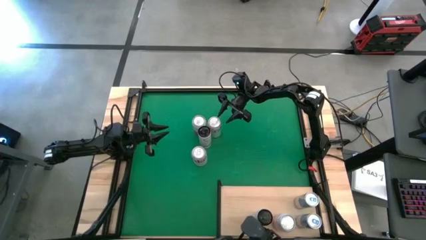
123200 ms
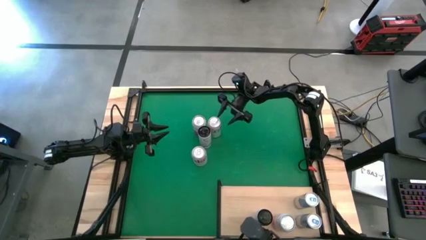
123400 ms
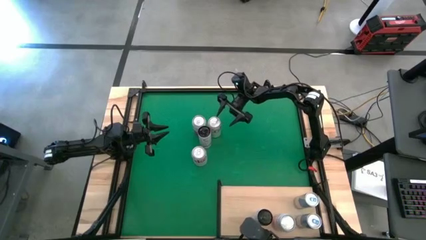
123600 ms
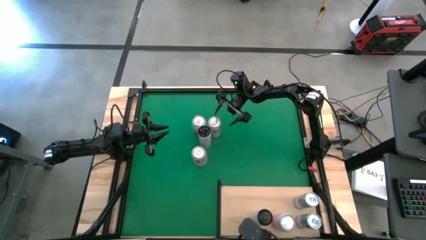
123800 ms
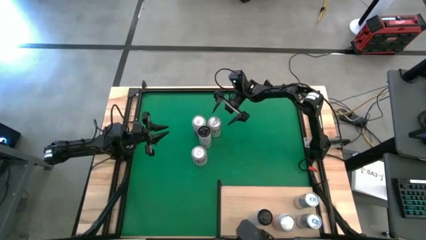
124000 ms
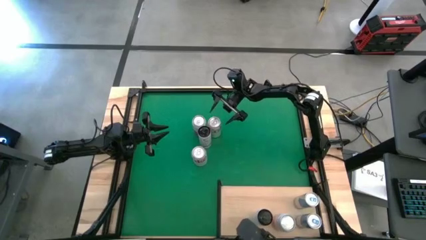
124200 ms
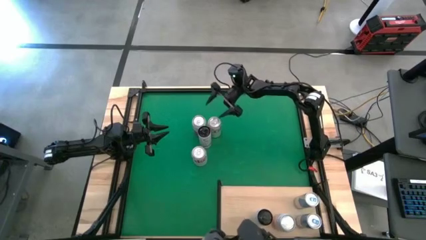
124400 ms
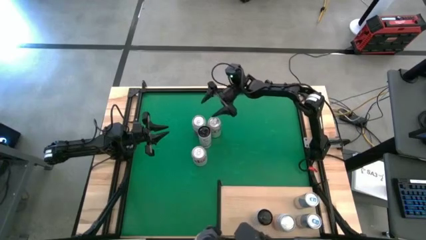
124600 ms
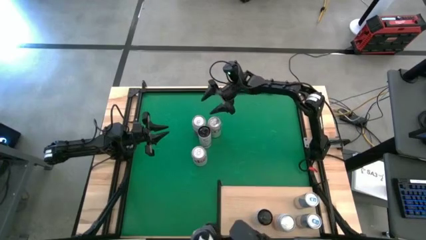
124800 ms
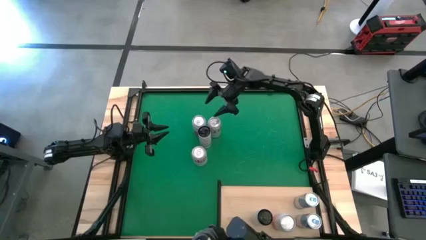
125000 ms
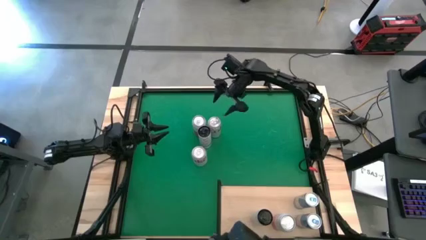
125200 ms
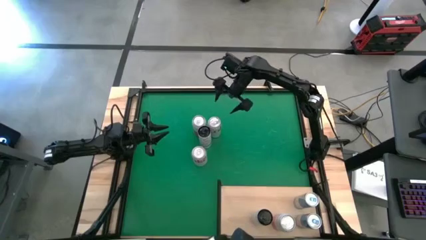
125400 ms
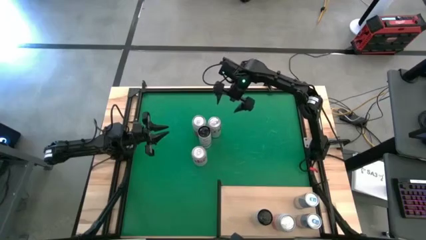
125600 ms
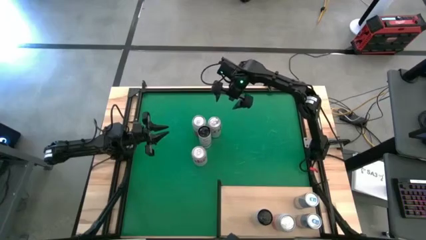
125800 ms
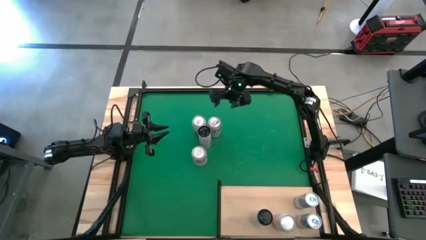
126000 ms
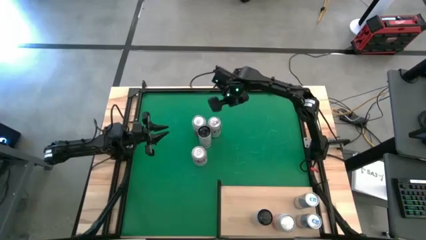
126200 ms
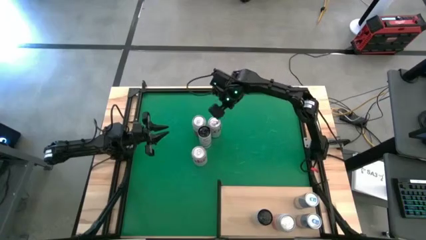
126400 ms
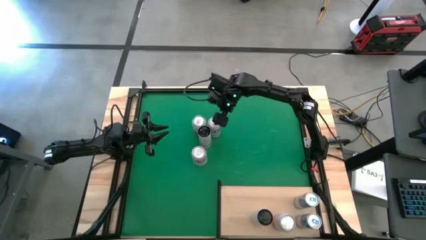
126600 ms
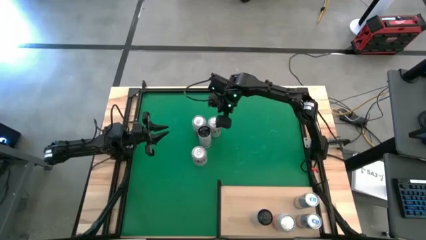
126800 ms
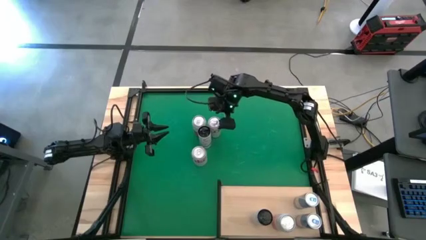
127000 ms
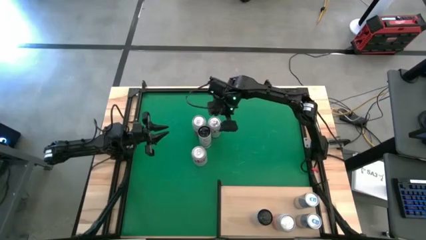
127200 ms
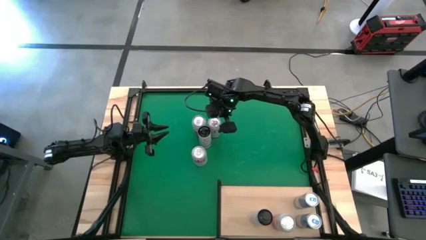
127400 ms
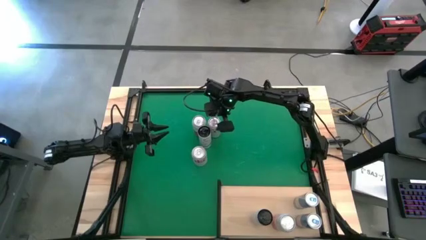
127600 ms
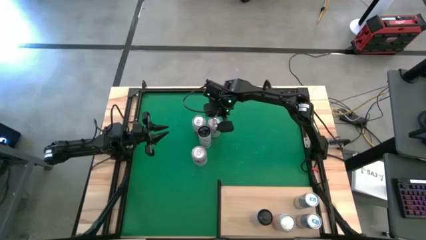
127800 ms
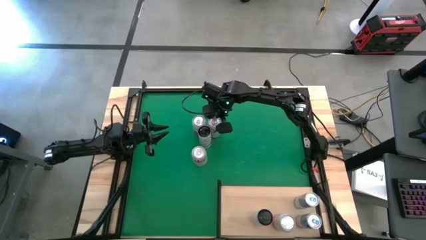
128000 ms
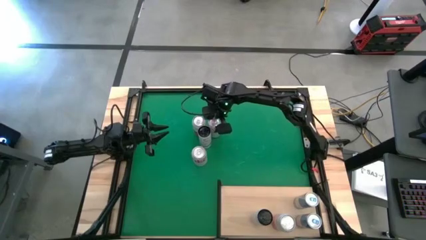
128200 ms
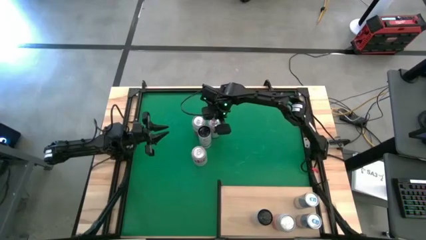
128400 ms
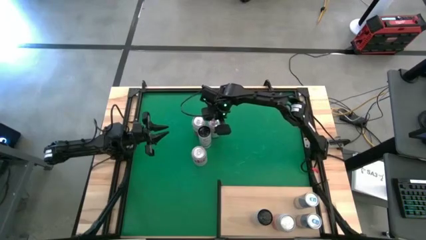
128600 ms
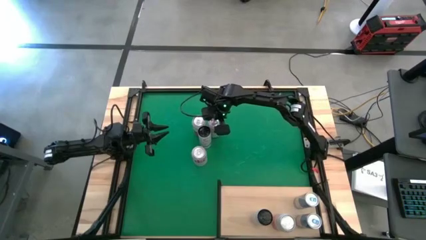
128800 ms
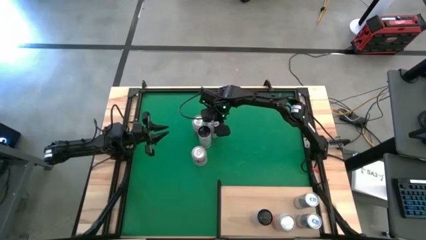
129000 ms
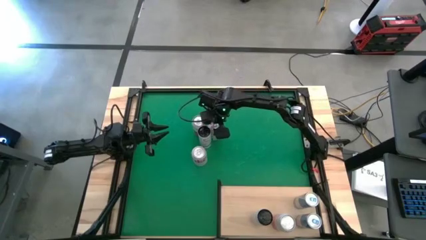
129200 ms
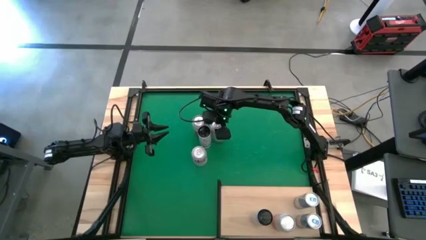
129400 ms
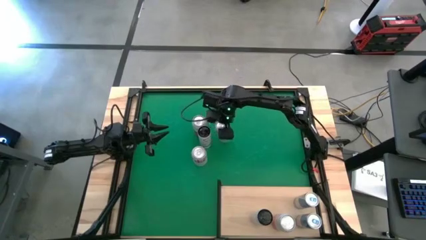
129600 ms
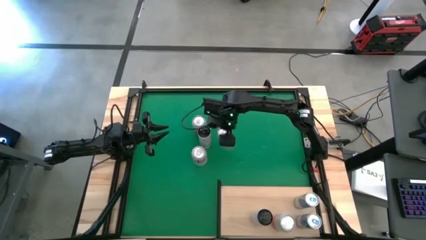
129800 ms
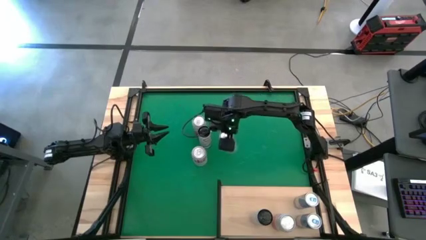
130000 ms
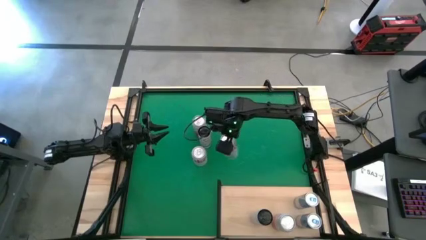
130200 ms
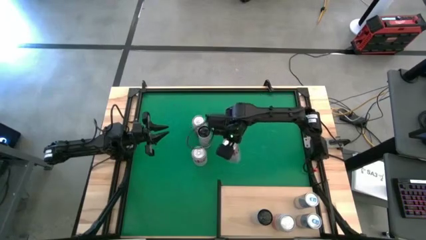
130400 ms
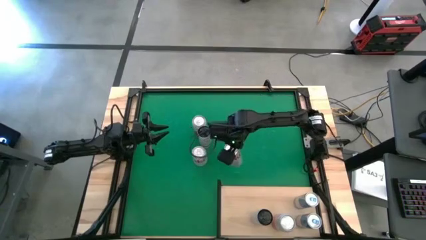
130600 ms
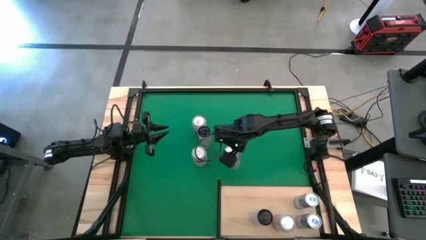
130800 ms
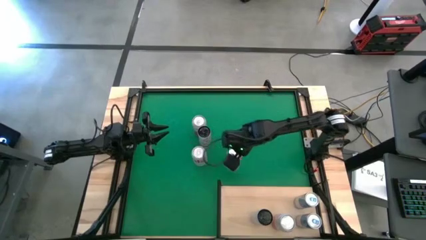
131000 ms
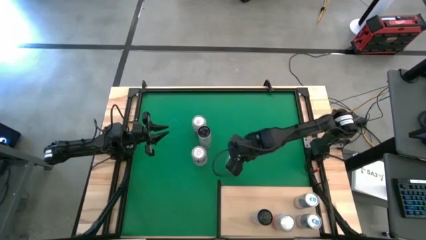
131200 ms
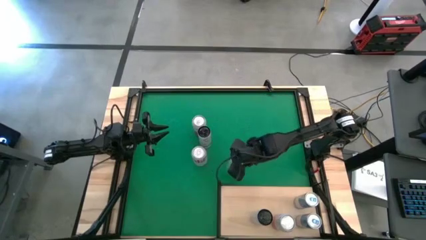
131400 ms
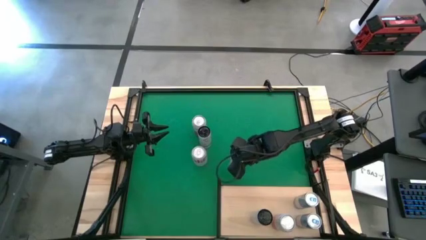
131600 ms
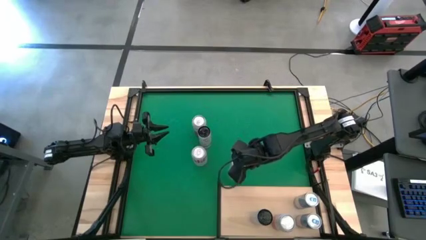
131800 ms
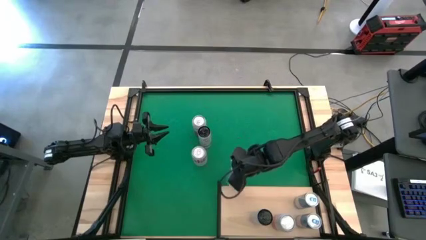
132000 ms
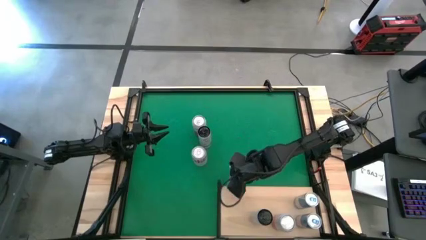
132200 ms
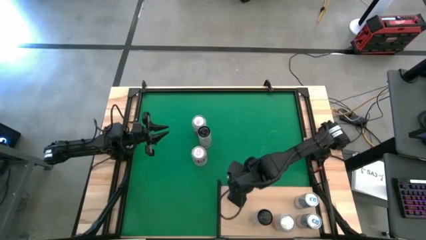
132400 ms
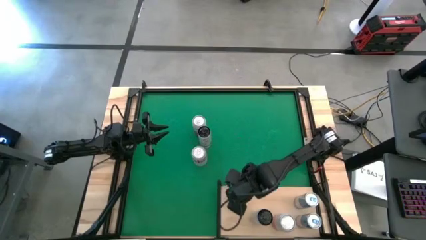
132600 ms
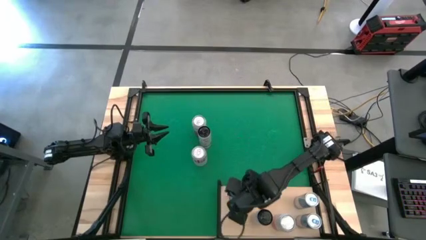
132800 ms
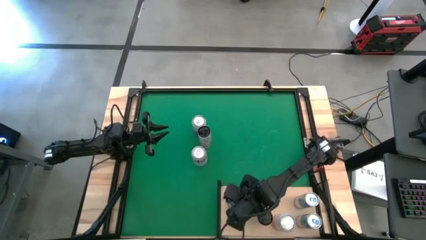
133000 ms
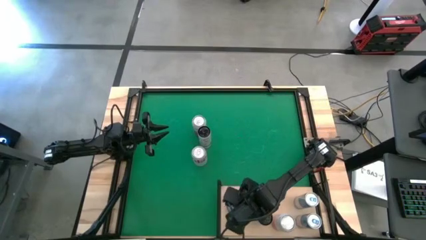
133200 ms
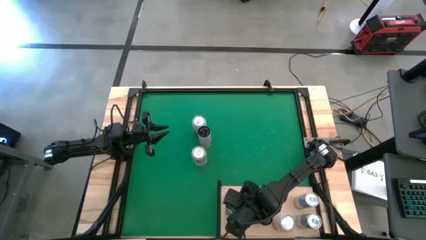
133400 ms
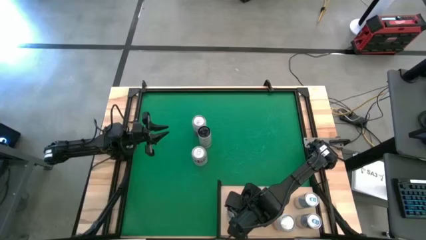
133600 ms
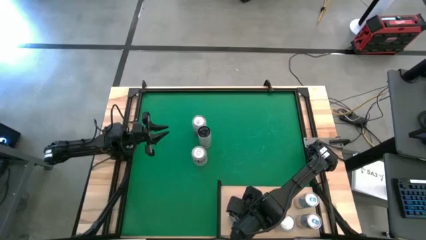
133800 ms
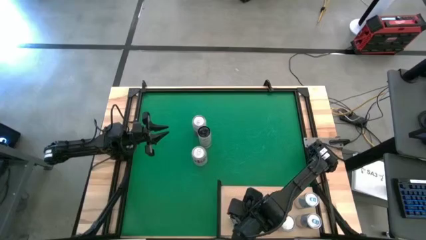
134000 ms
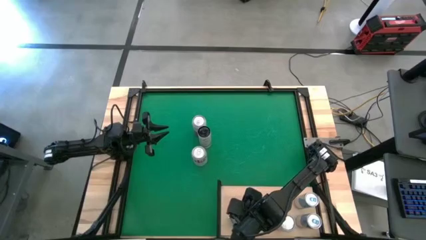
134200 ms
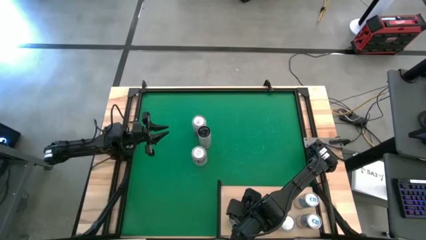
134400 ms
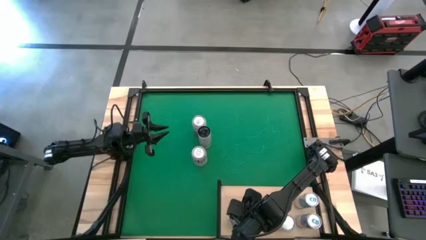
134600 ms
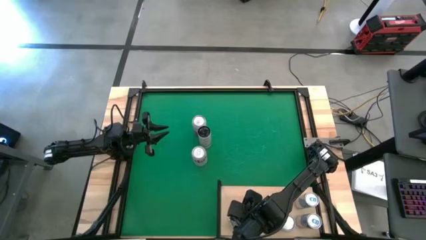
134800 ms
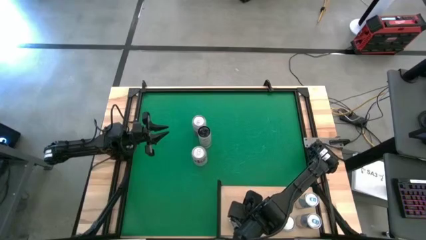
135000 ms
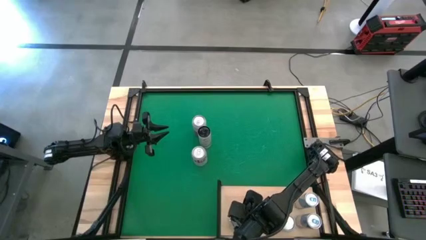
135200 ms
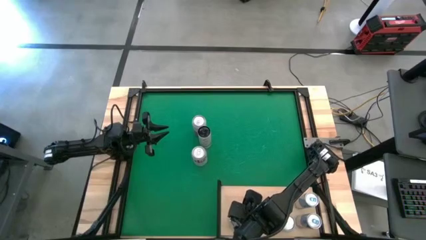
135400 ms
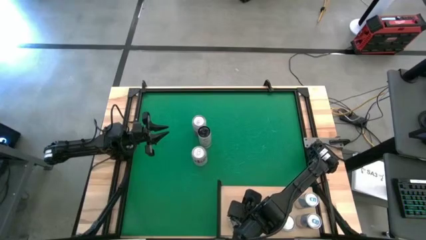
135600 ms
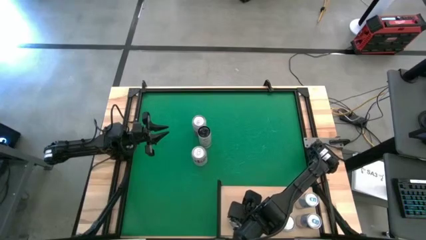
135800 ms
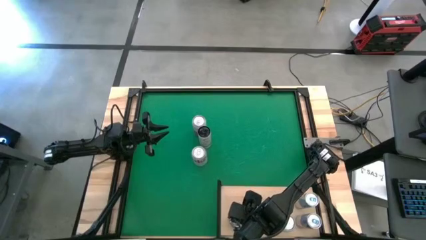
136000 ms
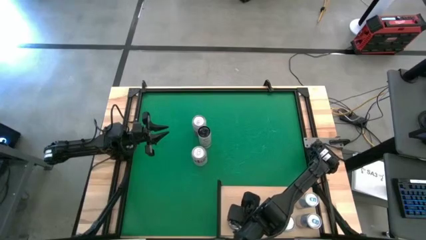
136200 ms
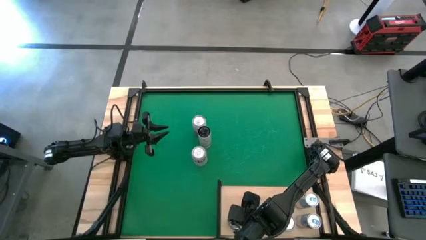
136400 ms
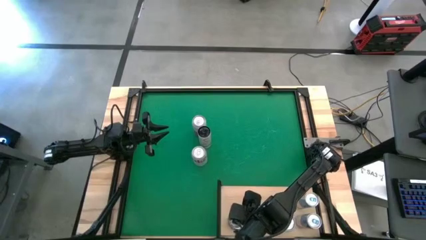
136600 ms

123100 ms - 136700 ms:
Task: Place canned beverage on shelf
Put the right red silver soda can on the shelf

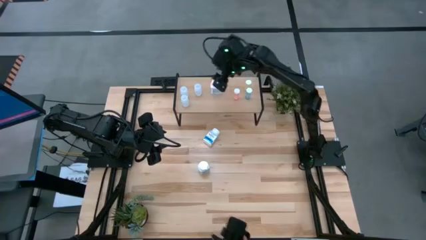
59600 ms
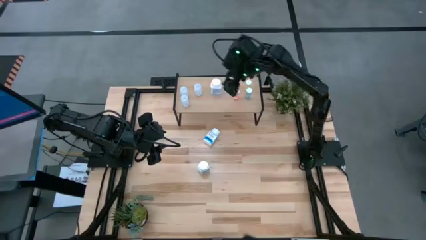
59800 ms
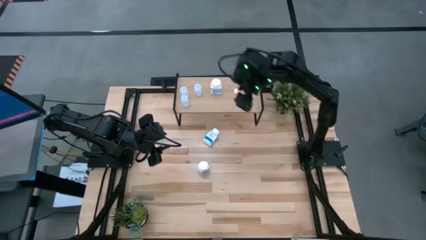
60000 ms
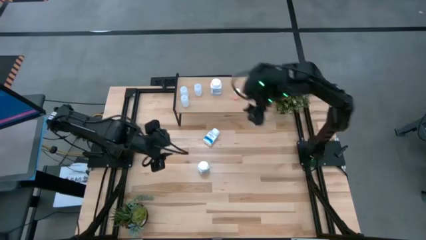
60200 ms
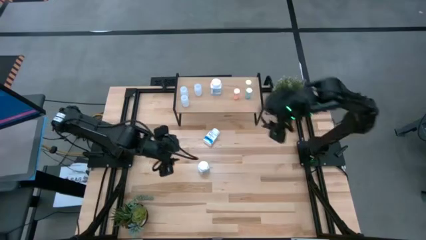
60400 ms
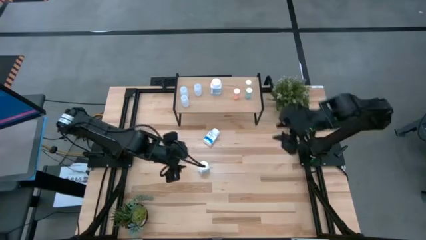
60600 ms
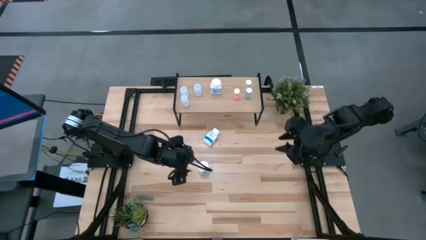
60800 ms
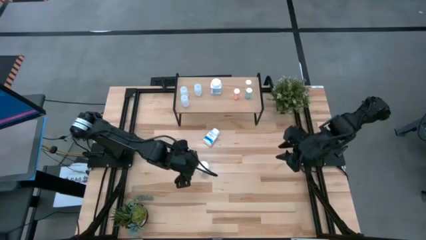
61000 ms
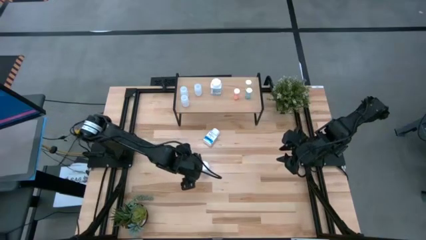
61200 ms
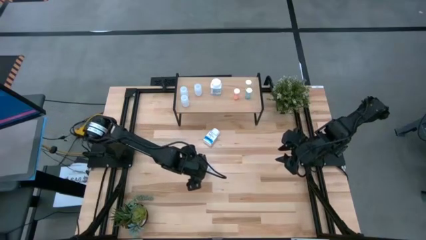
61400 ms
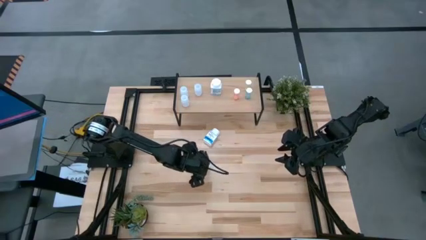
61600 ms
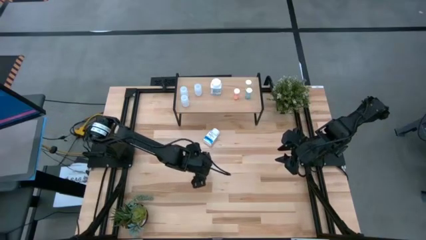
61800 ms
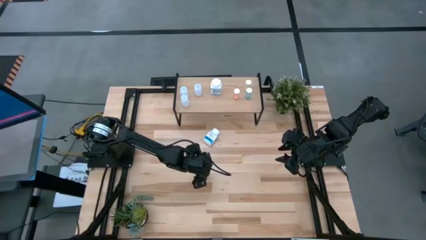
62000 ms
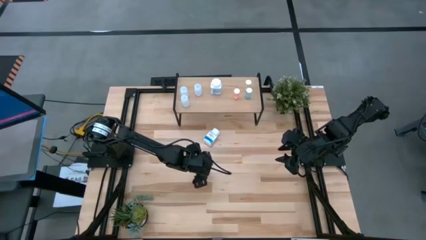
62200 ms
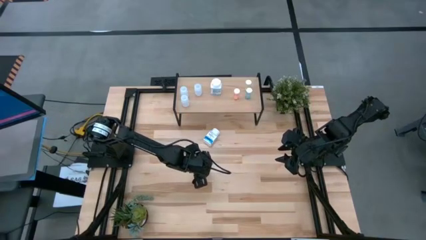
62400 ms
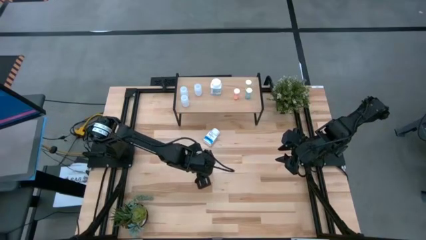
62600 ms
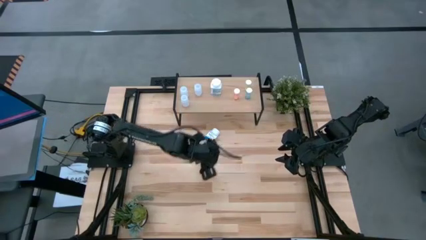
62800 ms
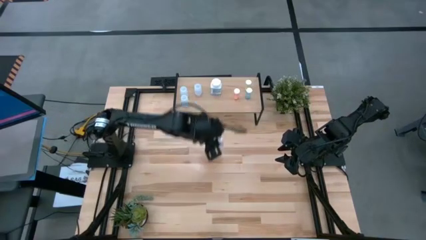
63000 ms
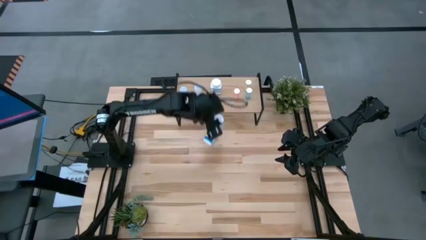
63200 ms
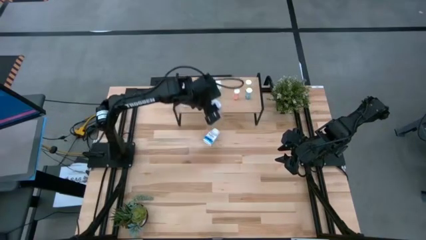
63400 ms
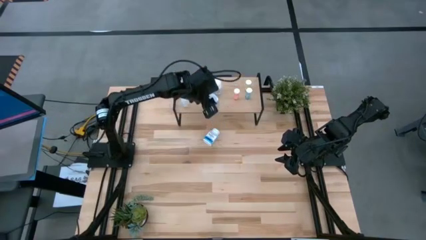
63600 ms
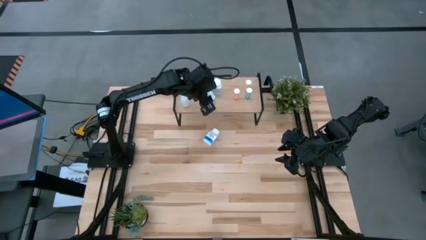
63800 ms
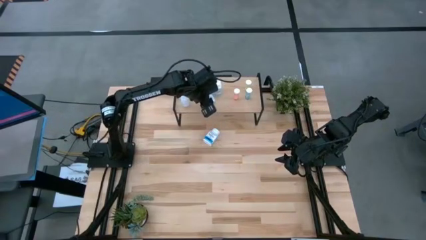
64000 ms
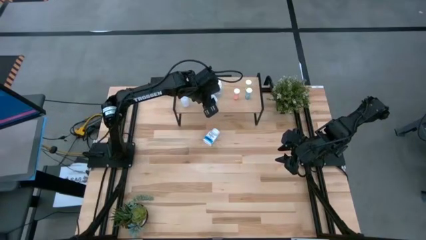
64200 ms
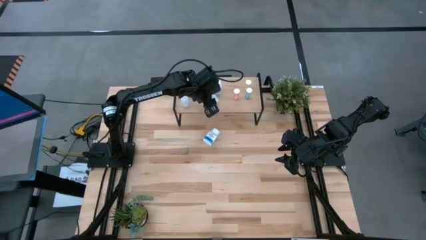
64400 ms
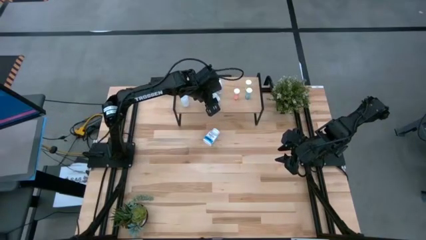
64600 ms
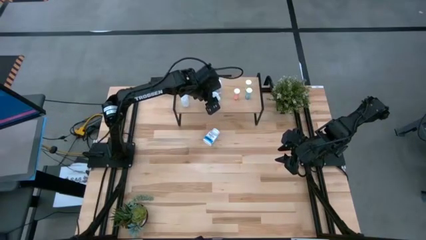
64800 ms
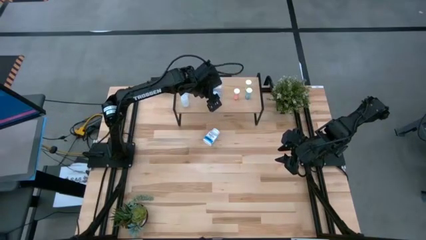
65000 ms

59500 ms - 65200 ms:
Task: Pick and place medicine bottles onto shelf by color
Put the bottom white medicine bottle on the shelf aligned with the other white medicine bottle
